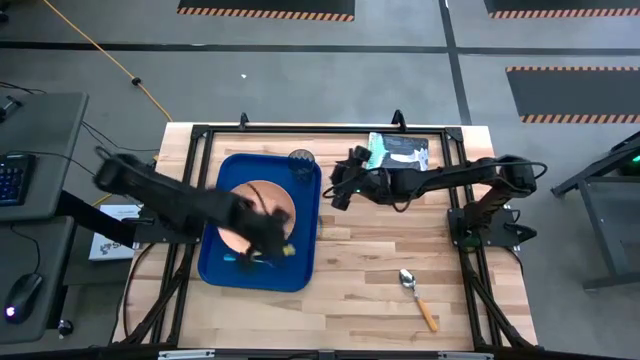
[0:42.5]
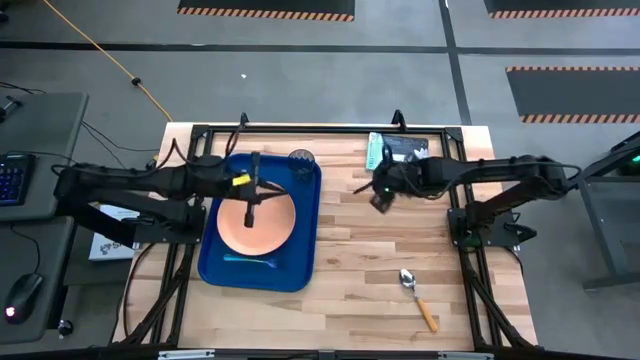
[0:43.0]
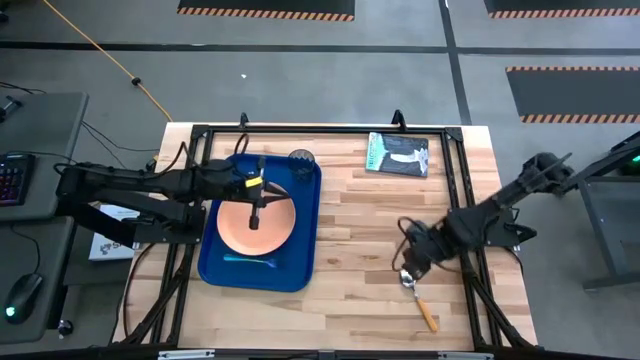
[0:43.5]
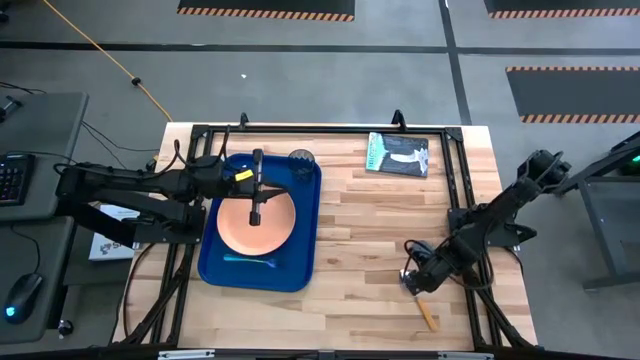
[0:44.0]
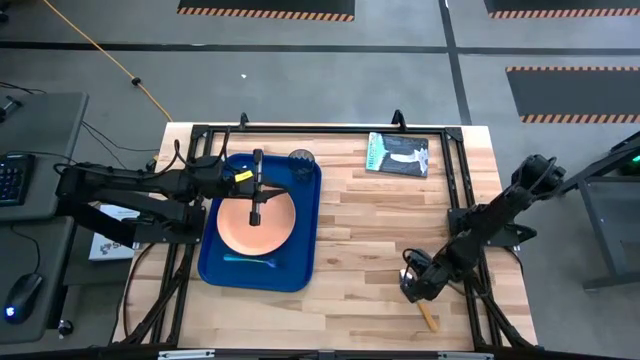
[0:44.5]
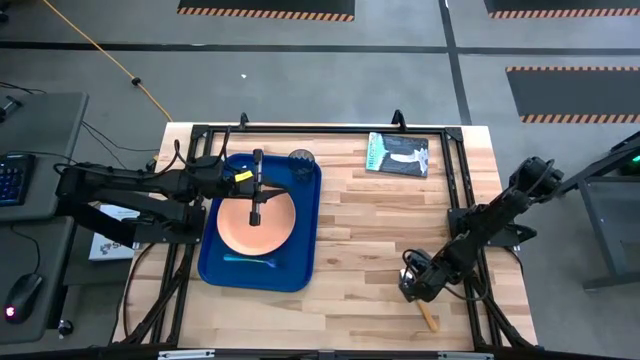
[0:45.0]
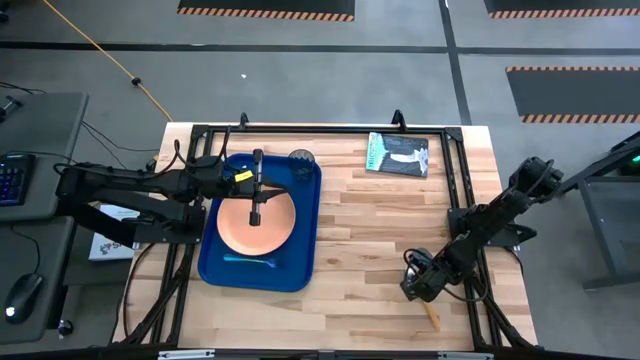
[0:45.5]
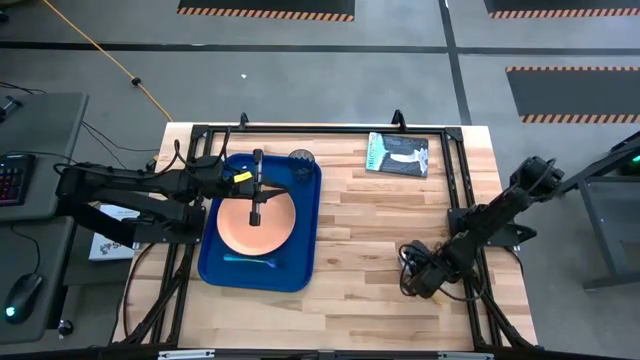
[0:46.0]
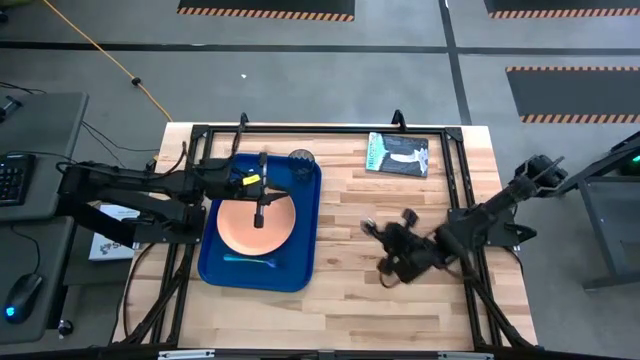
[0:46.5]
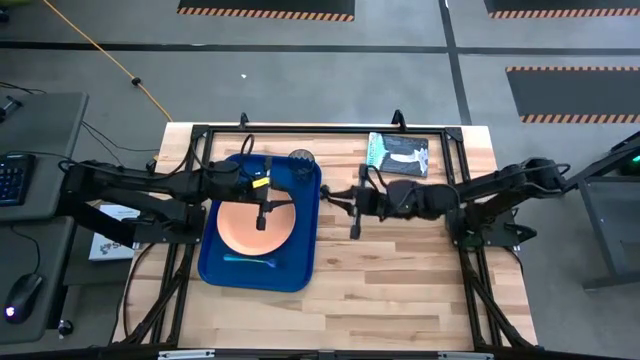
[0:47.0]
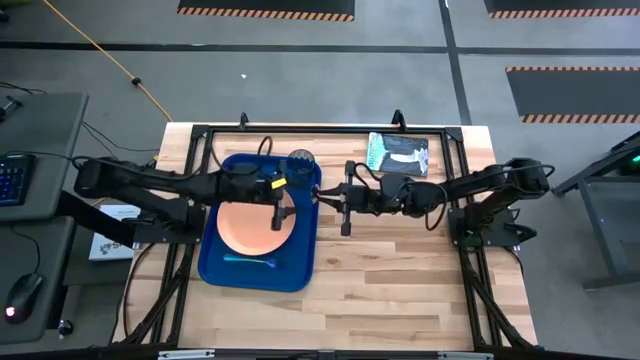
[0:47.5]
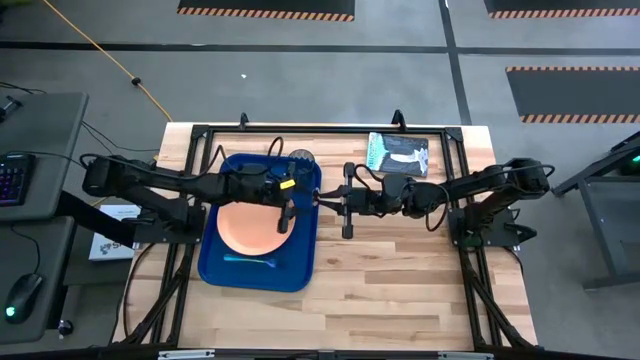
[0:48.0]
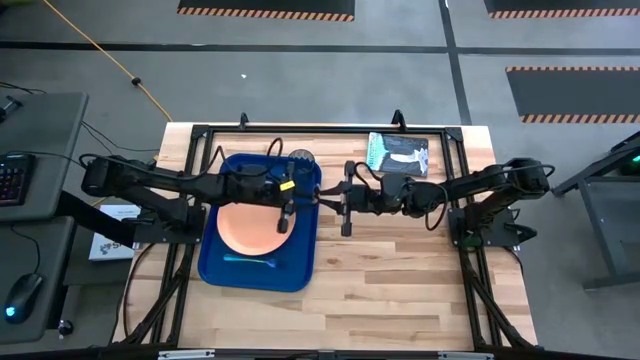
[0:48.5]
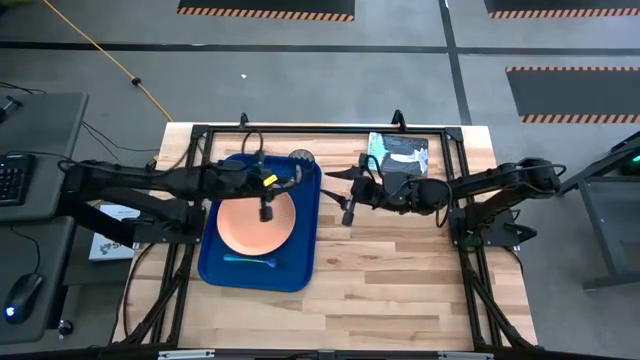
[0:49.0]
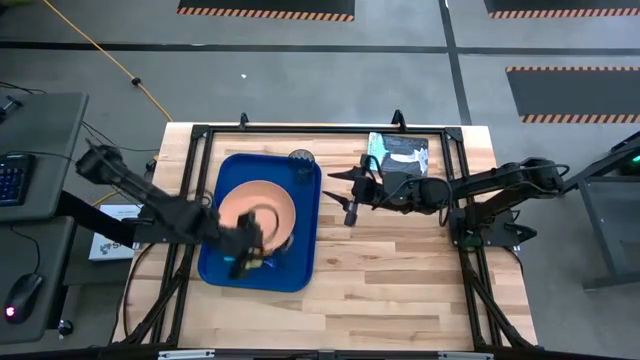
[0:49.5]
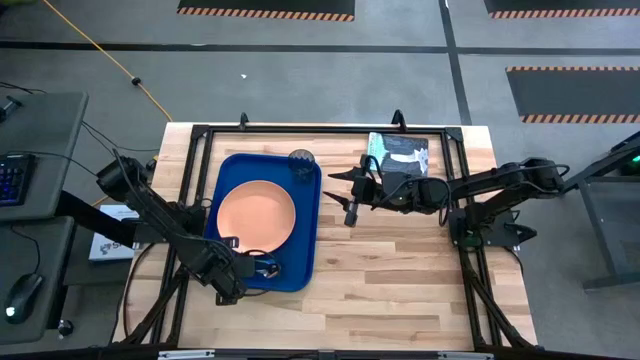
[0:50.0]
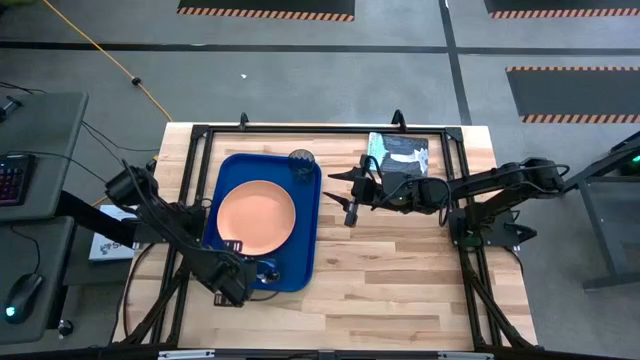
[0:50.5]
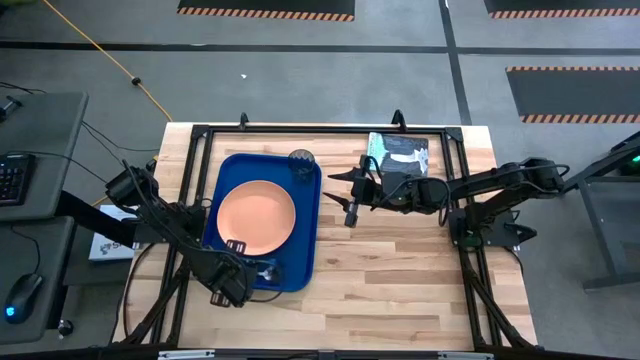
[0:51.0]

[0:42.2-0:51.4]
Task: Pick and place plate/cup/fork/spoon on tray
Put the orange spoon below the blue fork on the blue tray

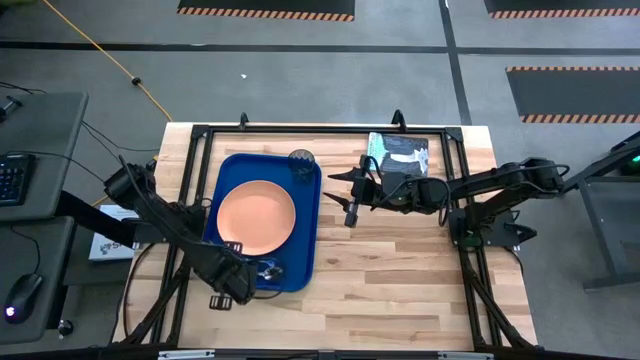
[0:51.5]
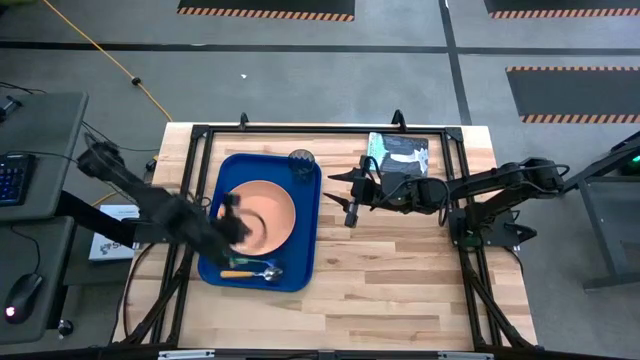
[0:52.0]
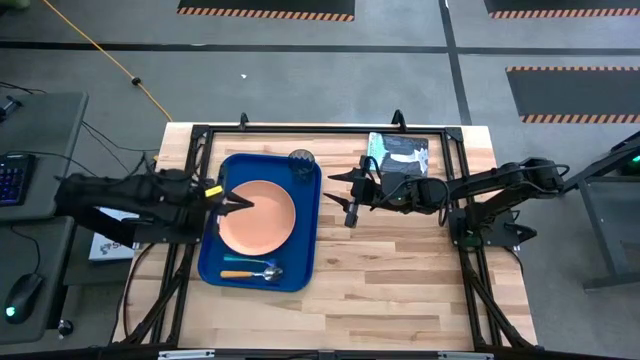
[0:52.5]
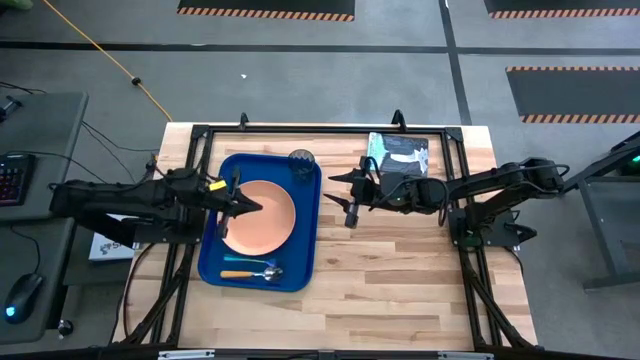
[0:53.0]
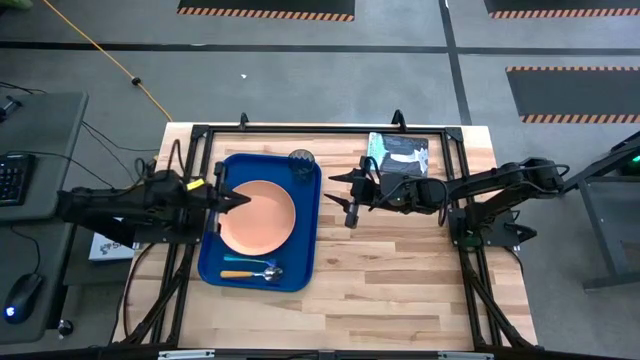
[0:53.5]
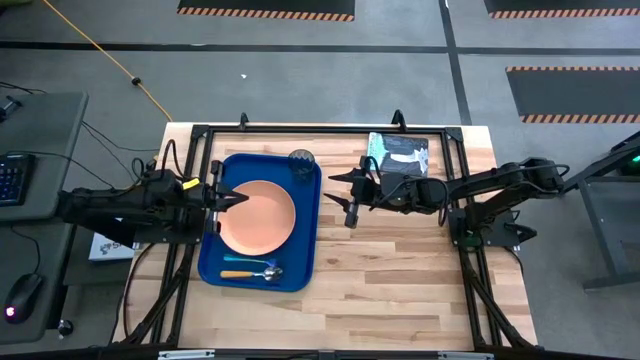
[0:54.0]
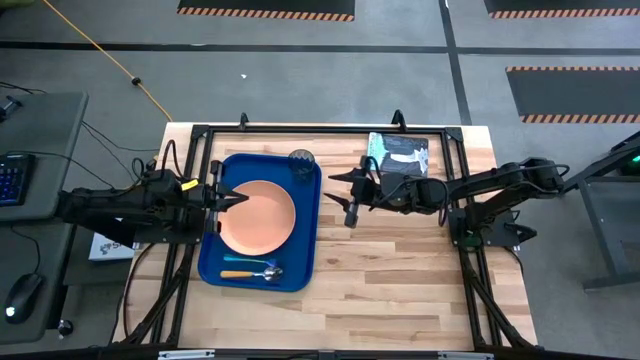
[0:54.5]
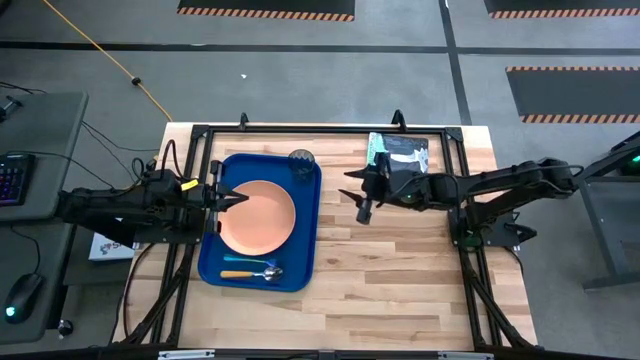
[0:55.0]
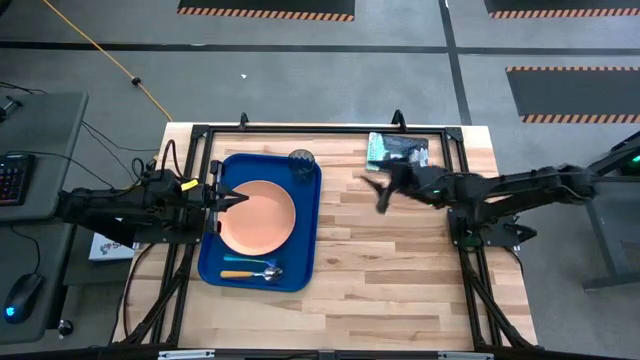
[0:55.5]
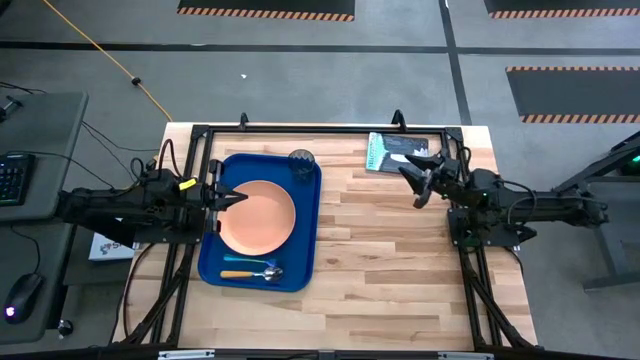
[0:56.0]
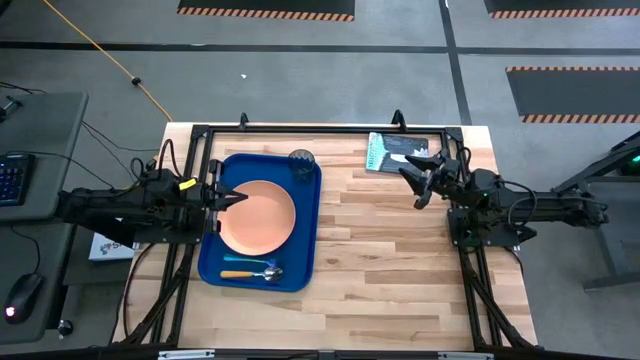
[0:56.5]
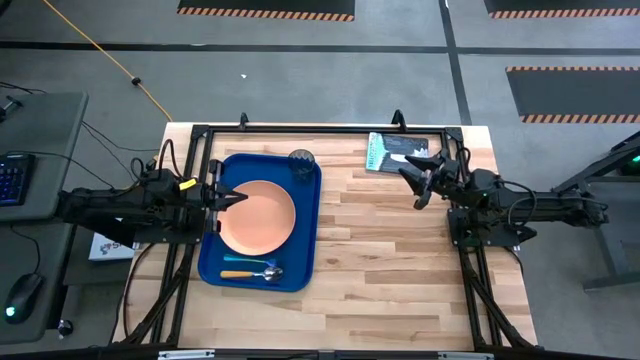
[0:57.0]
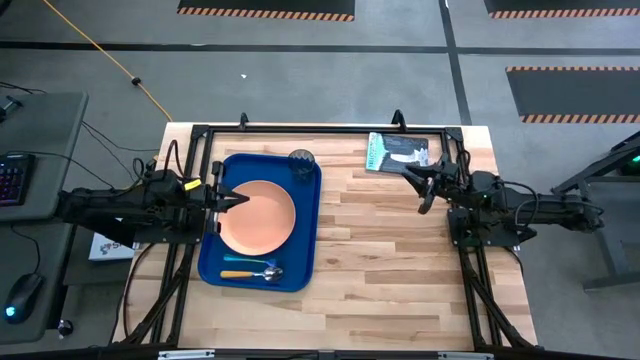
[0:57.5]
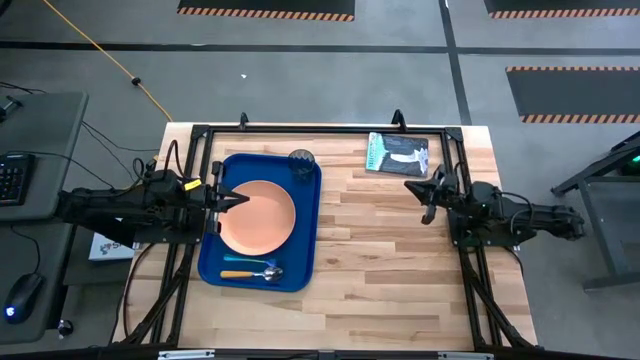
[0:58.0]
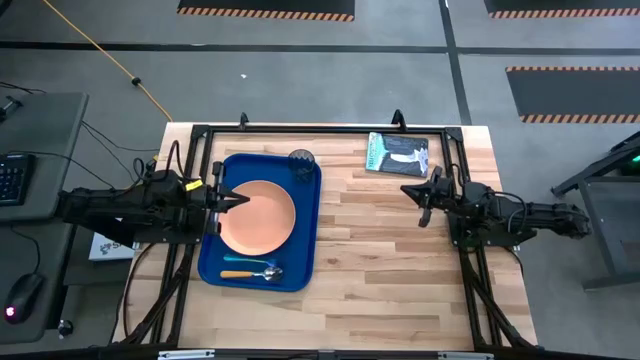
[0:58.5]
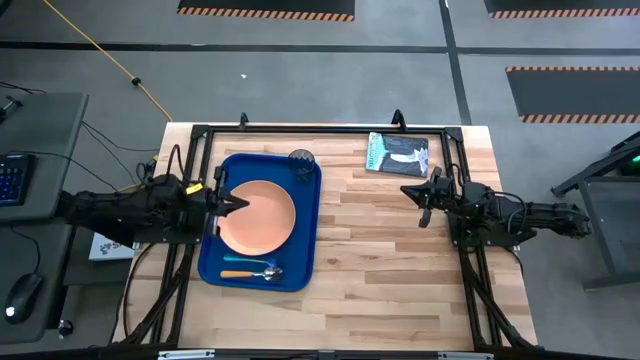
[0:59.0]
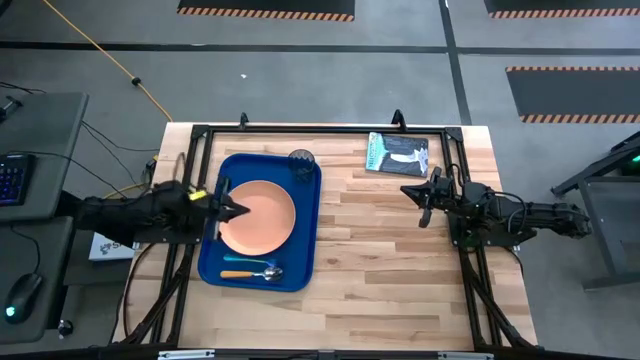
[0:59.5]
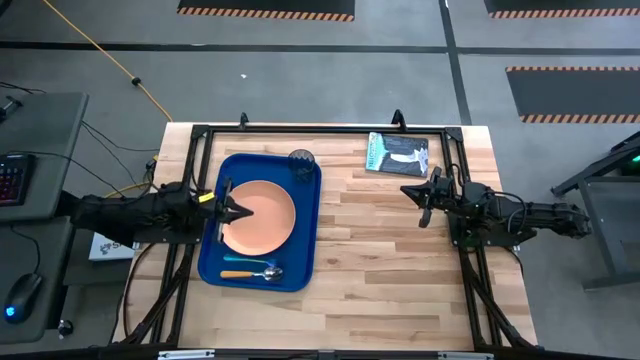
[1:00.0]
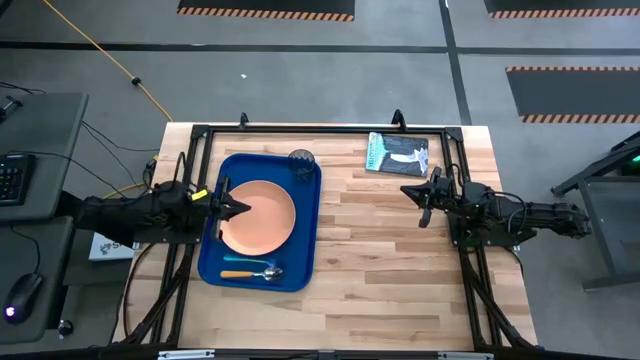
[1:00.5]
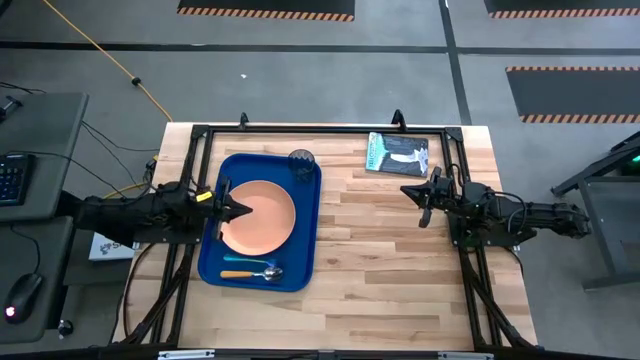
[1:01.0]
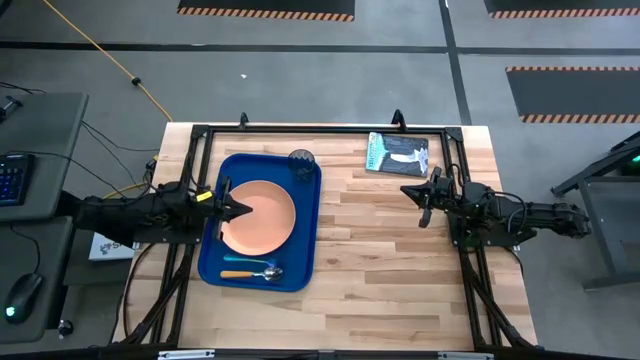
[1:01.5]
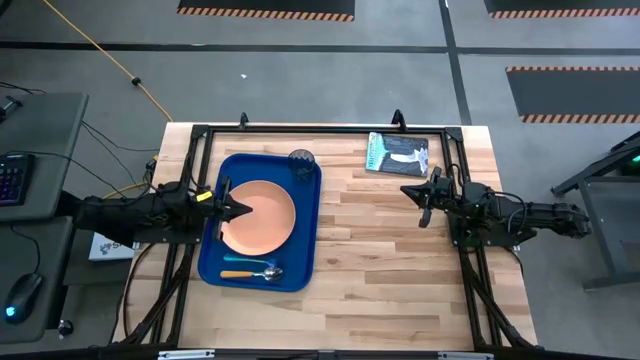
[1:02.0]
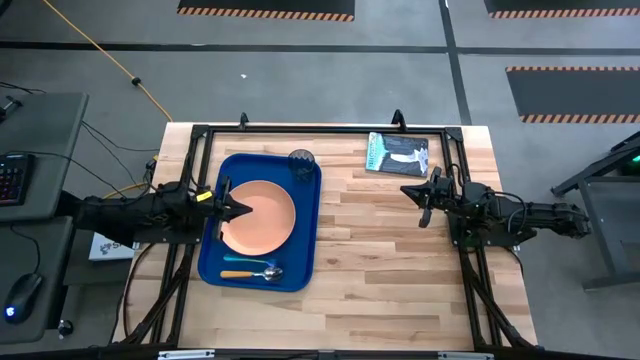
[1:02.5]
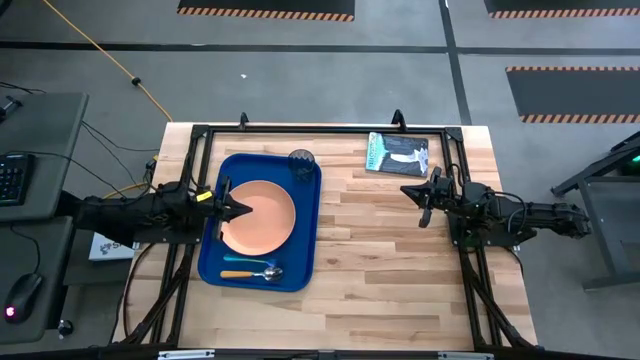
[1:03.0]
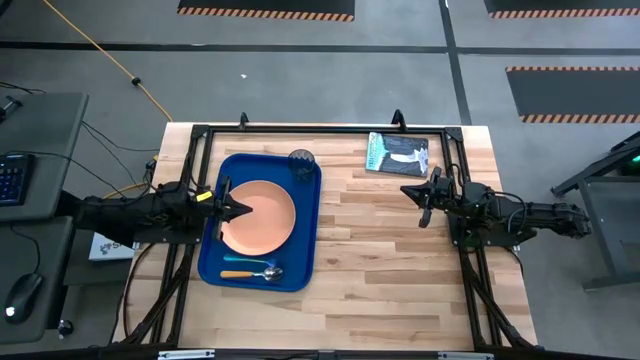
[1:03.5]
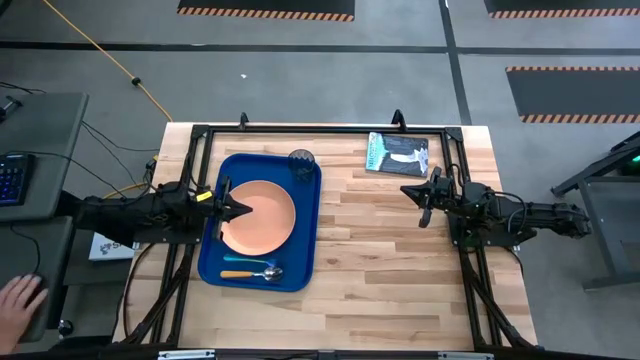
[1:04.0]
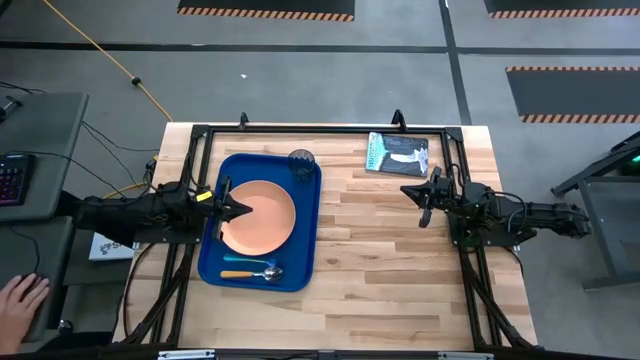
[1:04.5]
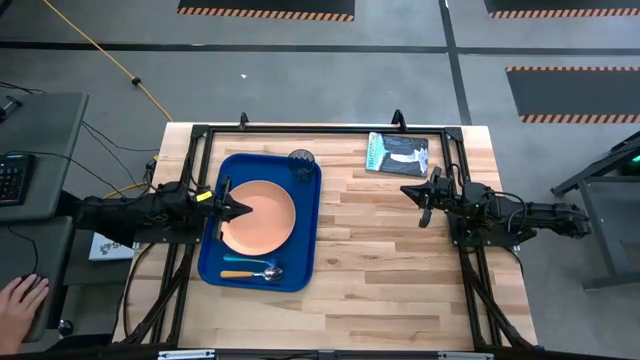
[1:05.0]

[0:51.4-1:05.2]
Return to Home Position
